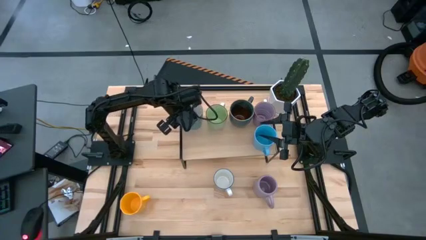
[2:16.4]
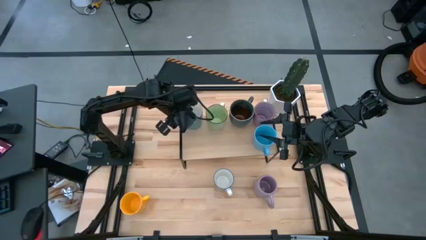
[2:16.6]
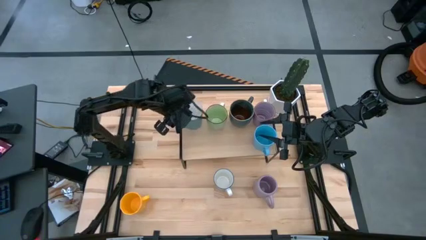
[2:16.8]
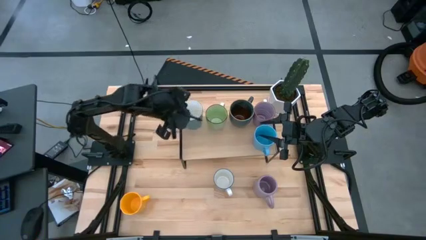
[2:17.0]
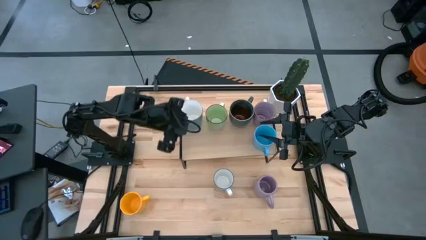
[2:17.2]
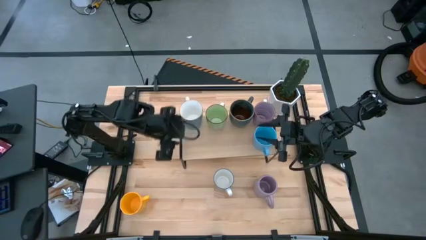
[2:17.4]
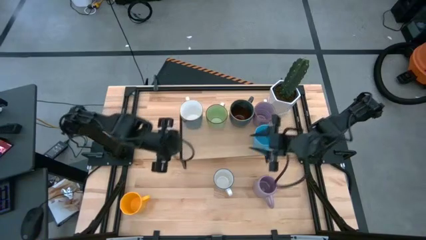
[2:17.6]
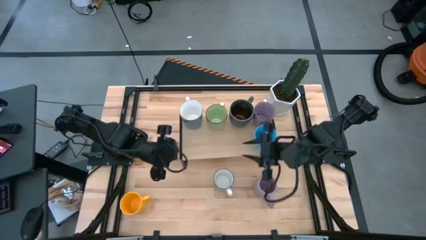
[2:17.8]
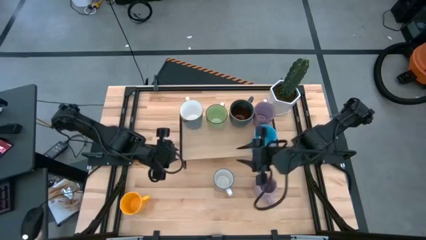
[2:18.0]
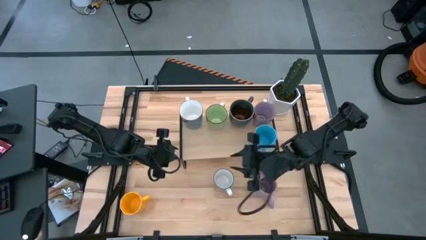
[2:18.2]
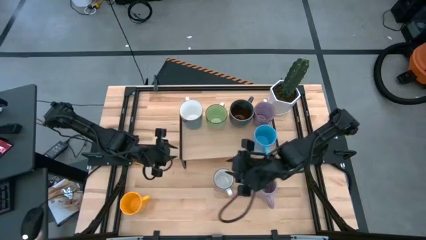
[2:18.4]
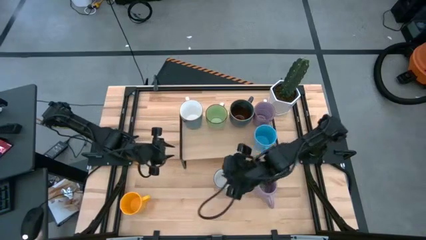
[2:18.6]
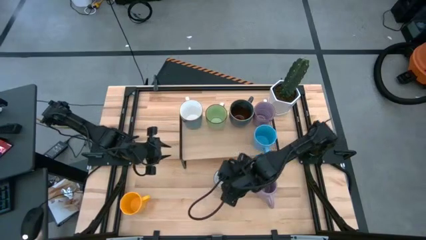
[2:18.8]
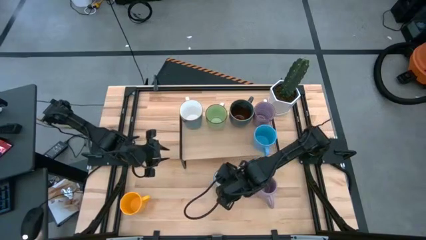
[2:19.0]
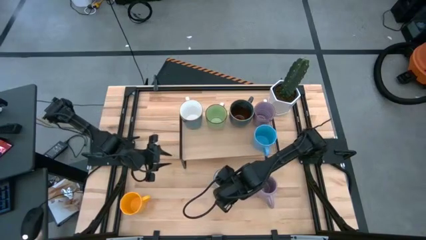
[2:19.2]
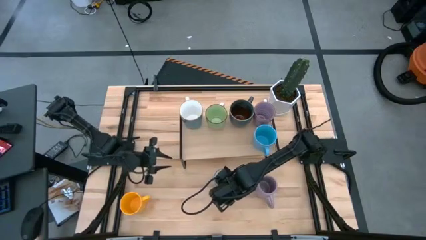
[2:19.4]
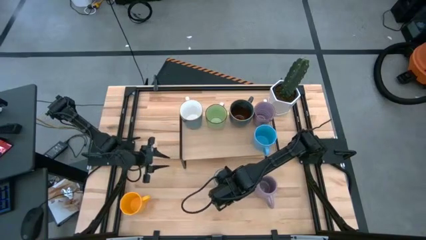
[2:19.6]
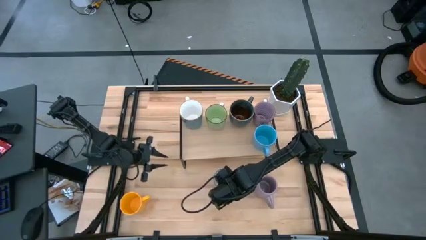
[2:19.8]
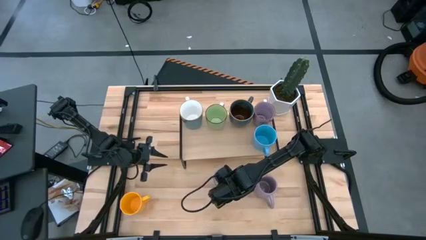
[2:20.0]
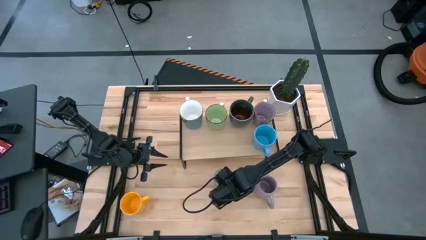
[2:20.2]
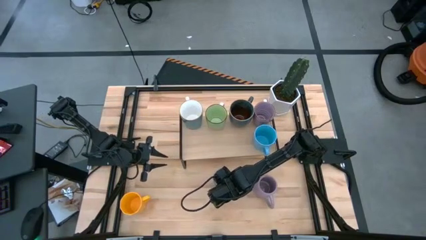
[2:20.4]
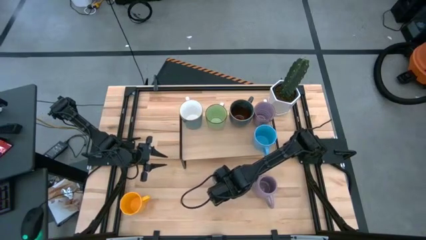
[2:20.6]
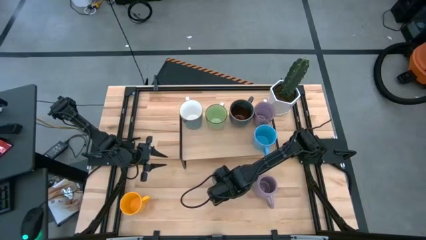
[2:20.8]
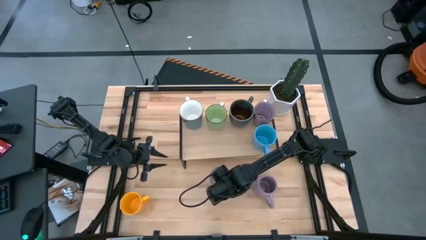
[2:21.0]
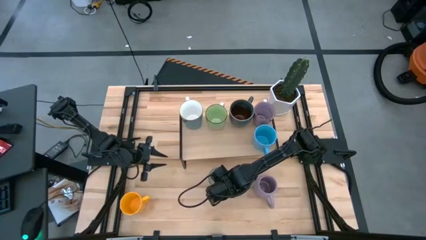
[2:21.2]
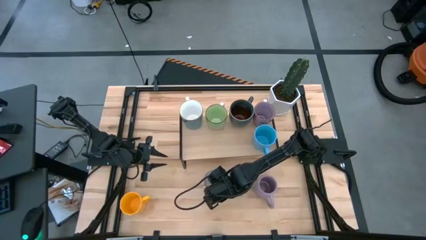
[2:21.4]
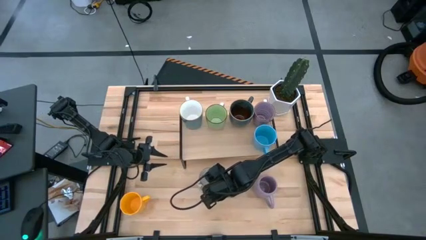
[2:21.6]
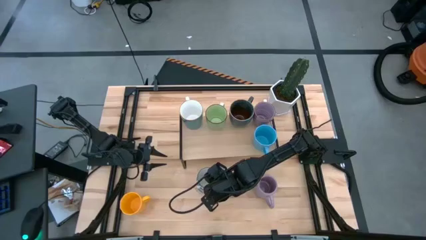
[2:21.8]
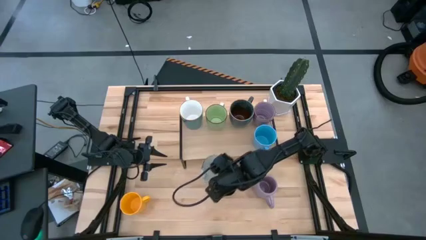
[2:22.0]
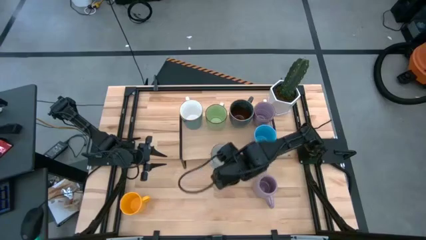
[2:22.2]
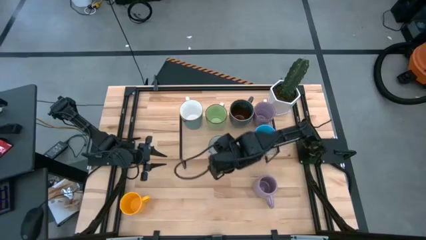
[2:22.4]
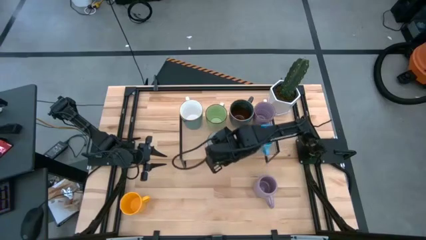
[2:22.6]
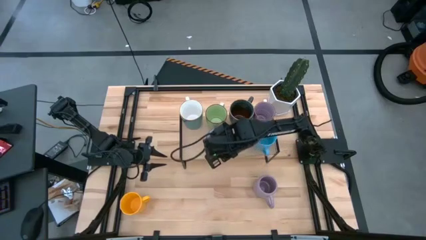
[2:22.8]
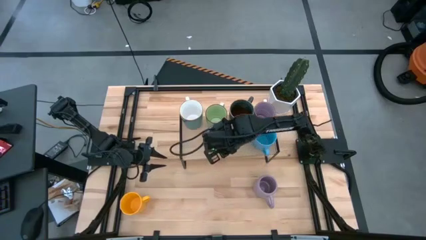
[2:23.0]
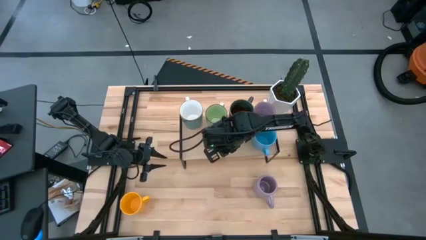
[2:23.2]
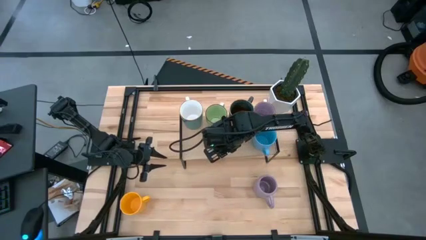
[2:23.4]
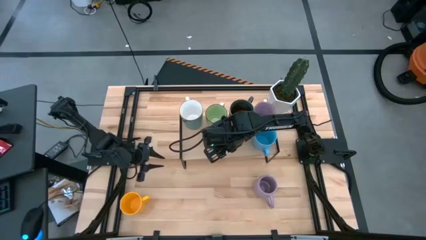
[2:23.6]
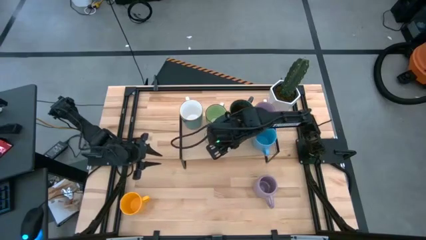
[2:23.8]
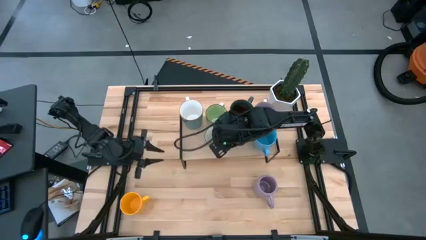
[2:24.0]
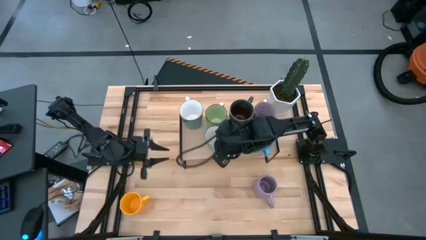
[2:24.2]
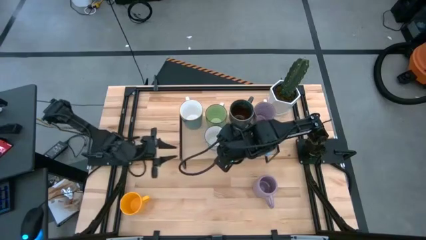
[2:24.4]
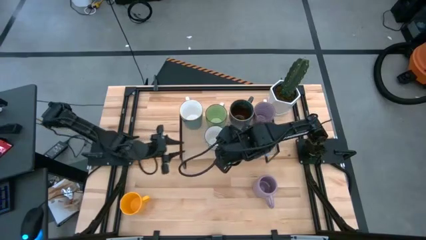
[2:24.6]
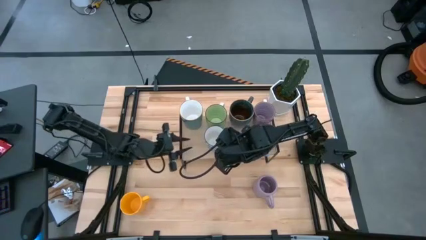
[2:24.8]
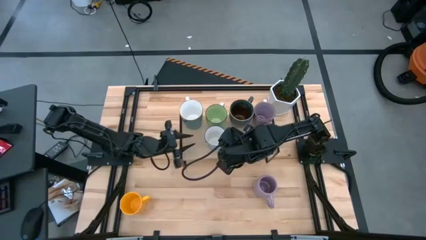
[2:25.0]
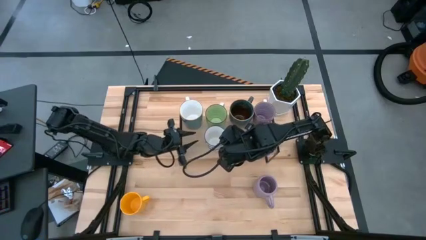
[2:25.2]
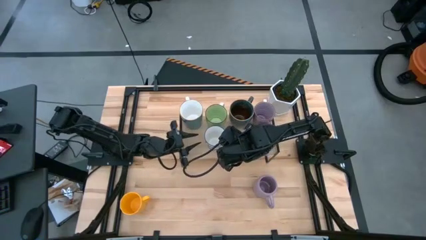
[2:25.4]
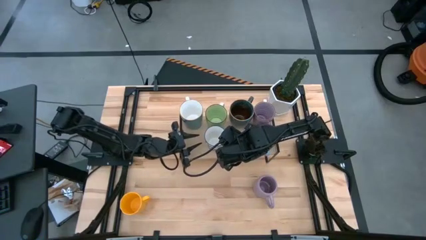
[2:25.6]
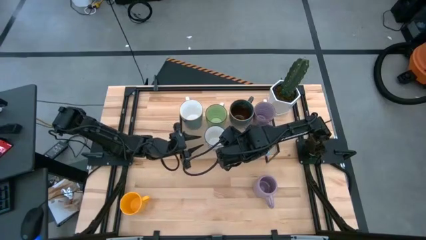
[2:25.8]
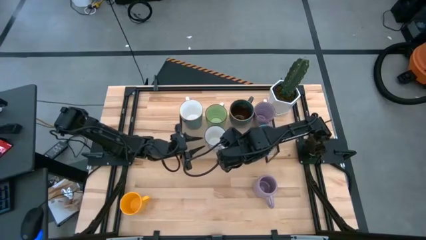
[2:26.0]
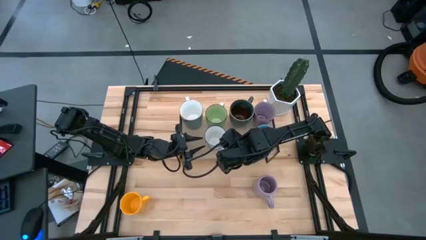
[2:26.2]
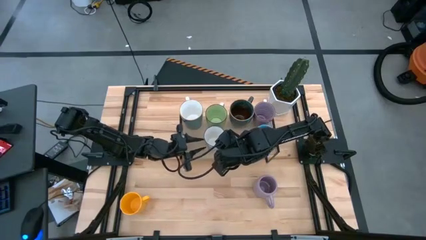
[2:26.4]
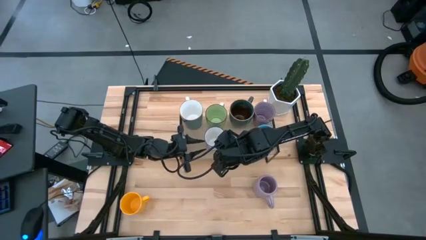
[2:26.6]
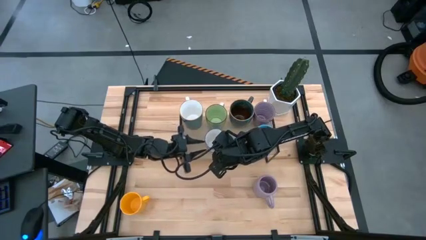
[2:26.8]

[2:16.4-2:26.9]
Task: Place coffee mugs
Put the white mug on the shelf aligned with the other dark green mug on the shelf

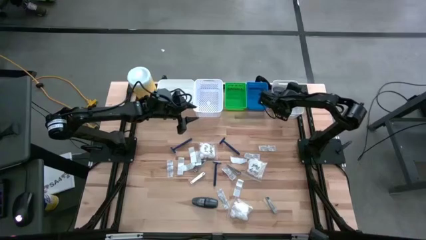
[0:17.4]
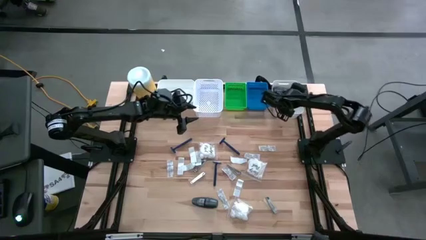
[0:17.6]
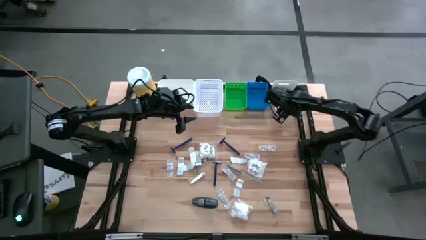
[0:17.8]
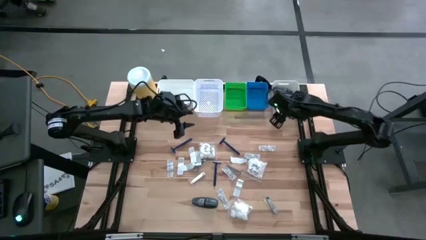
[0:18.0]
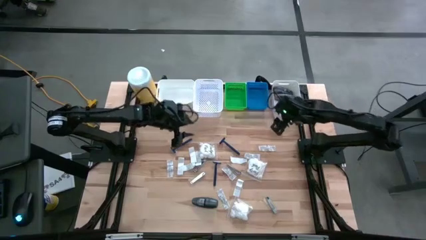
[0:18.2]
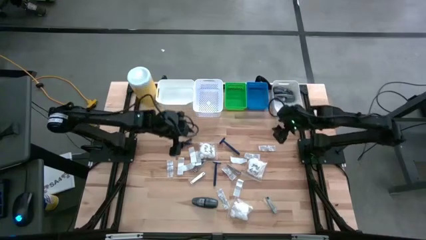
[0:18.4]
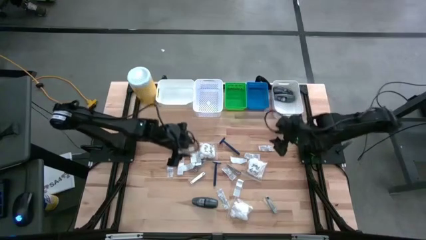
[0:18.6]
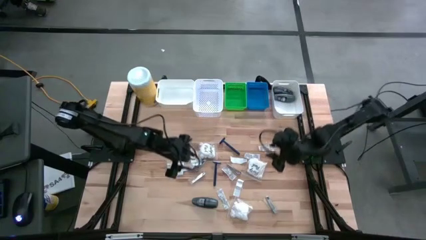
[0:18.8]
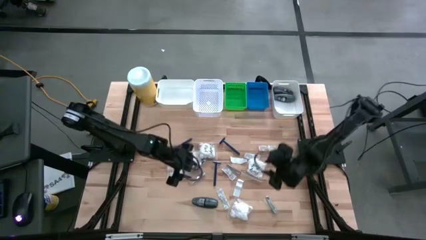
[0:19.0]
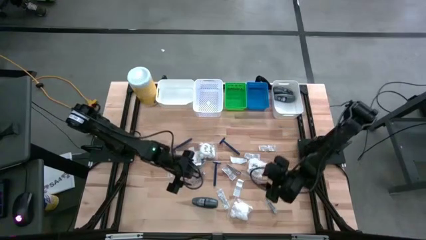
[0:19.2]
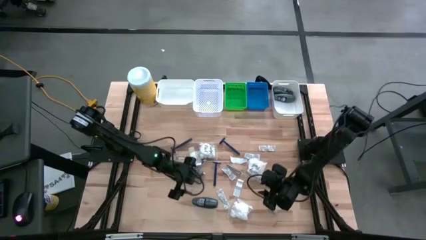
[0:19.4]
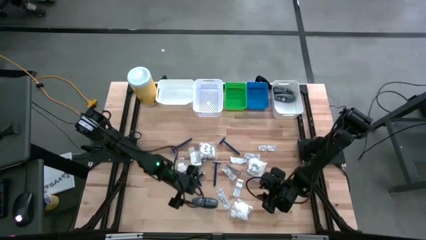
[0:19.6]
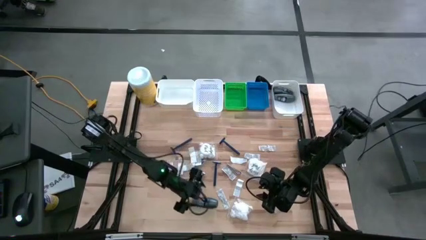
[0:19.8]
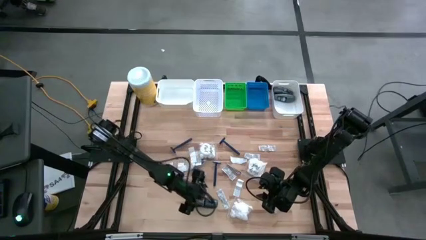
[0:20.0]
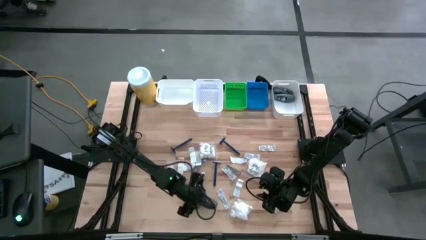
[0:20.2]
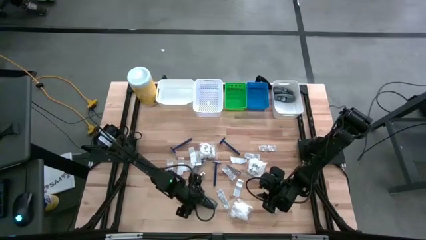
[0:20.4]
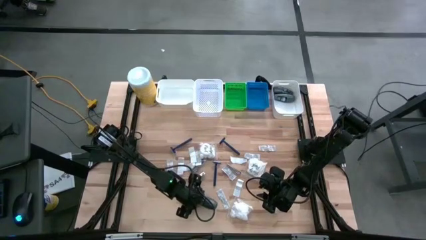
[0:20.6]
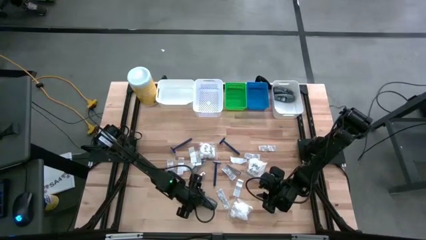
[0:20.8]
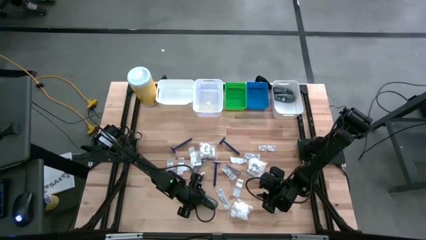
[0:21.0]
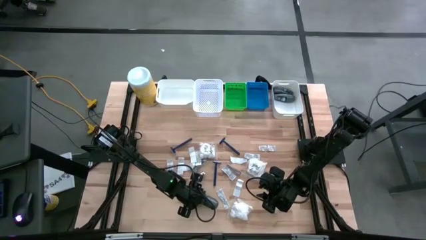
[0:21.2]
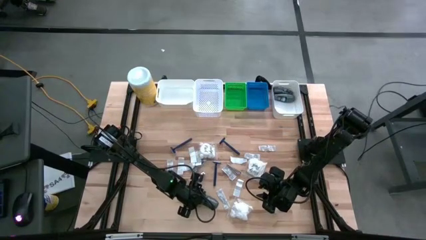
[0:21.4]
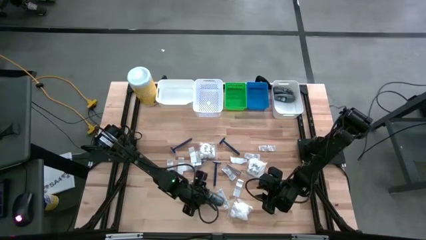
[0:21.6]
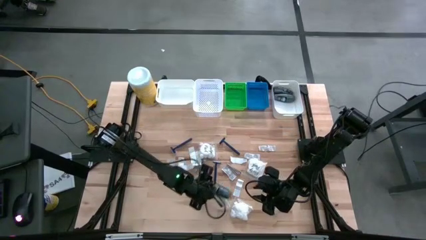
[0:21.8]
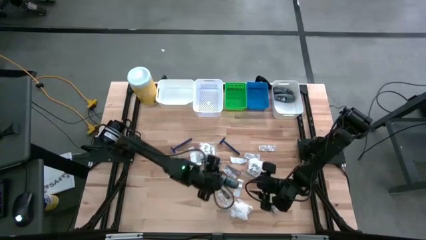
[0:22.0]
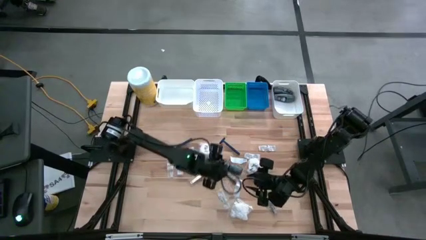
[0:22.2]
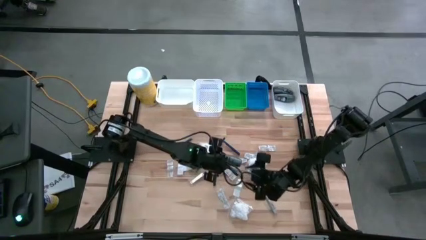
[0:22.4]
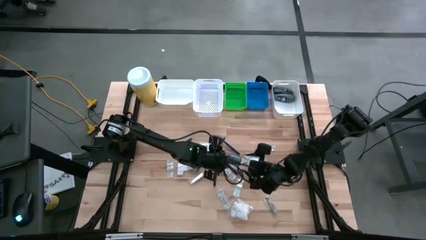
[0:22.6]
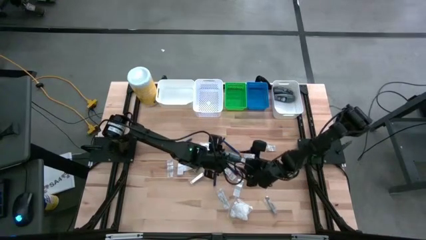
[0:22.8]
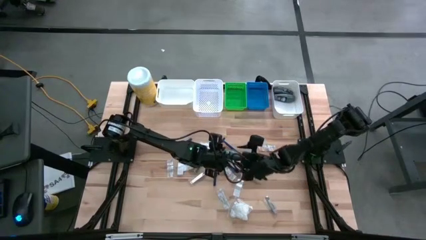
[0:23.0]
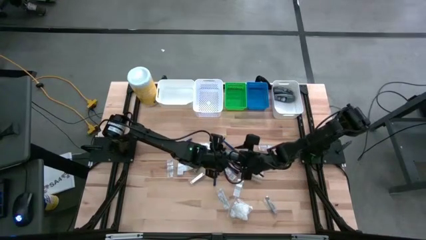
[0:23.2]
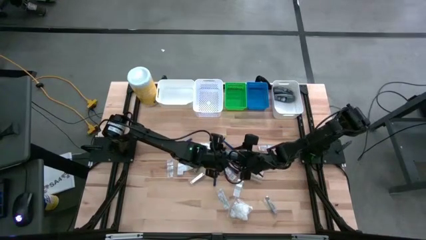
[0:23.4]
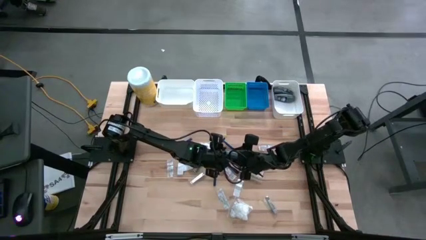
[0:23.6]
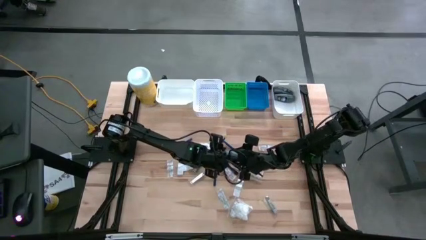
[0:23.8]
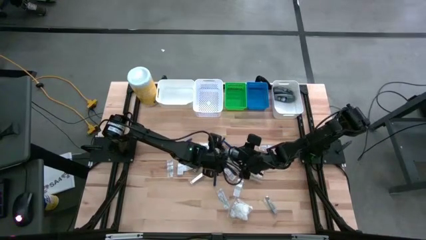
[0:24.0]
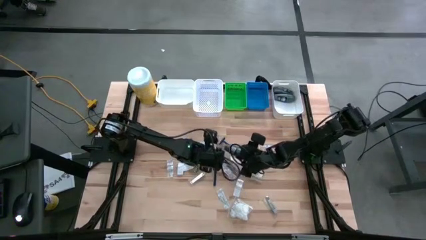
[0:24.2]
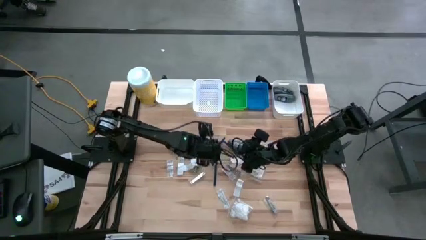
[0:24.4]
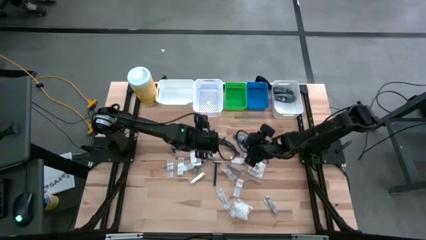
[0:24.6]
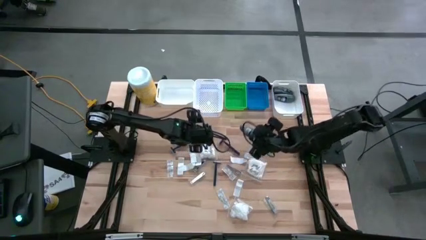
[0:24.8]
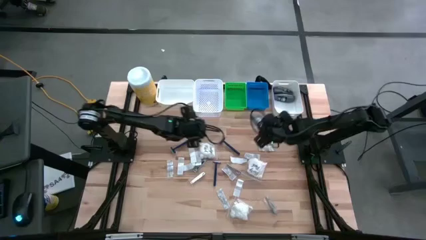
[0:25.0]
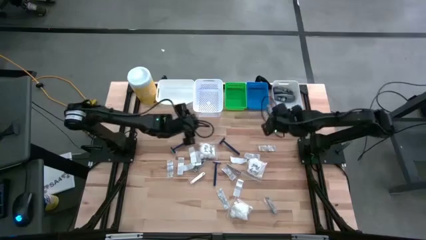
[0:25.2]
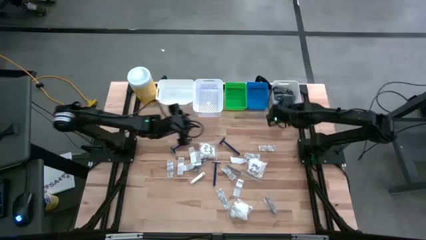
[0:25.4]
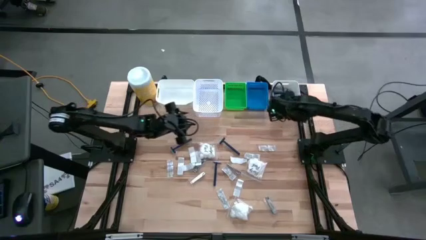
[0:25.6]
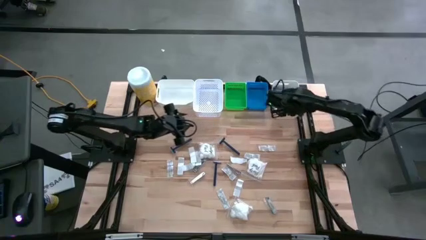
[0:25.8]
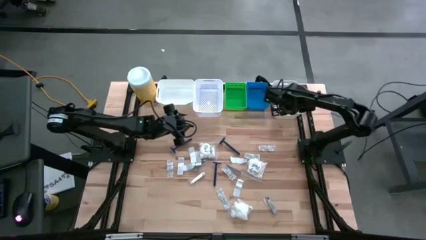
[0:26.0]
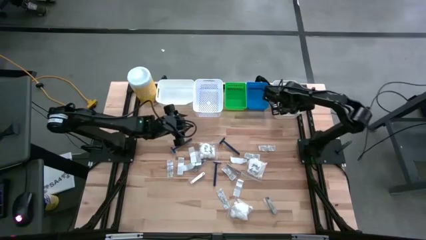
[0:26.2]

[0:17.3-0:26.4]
Task: Pick & Place Travel size toiletries
Put the black deodorant into the right white bin
